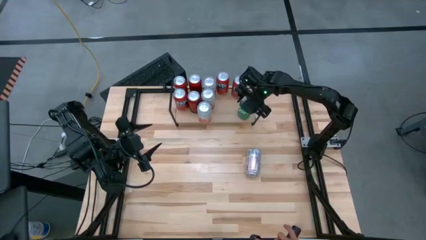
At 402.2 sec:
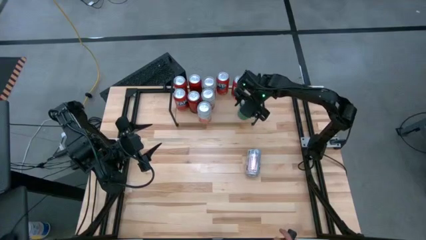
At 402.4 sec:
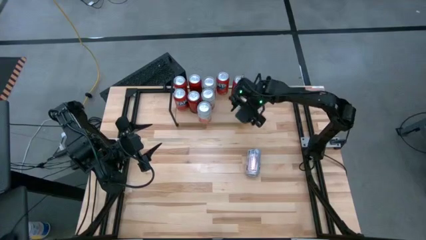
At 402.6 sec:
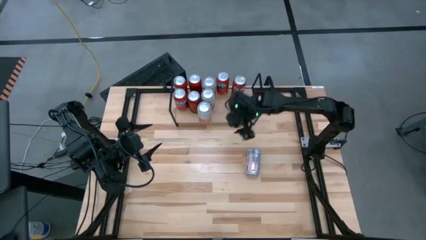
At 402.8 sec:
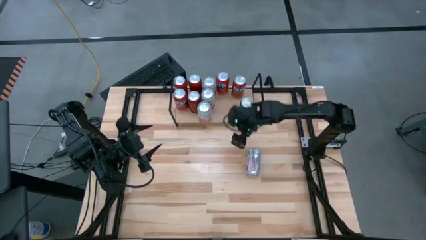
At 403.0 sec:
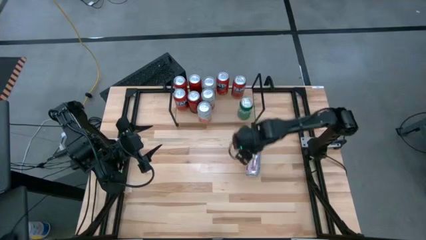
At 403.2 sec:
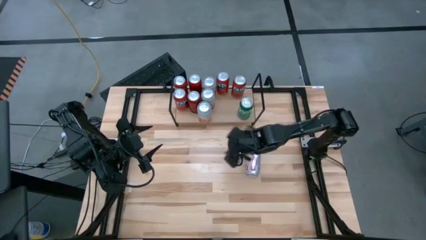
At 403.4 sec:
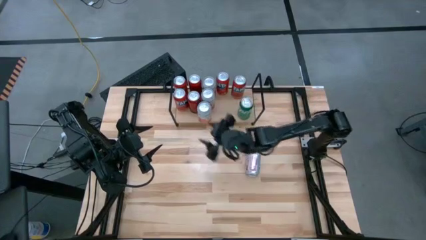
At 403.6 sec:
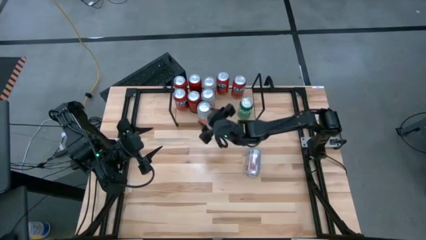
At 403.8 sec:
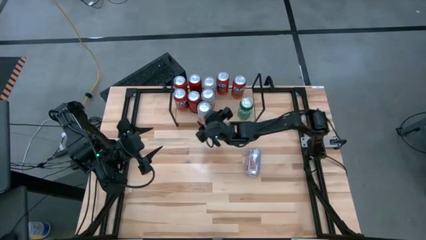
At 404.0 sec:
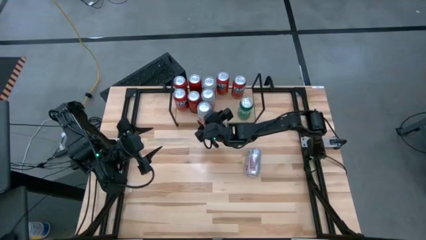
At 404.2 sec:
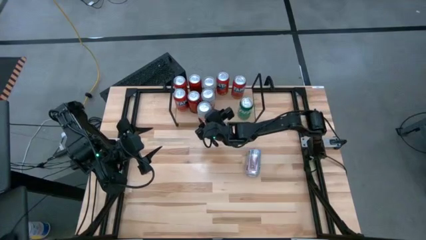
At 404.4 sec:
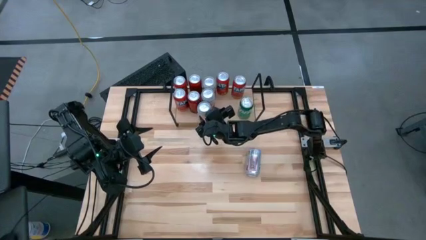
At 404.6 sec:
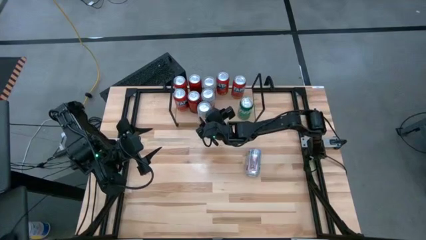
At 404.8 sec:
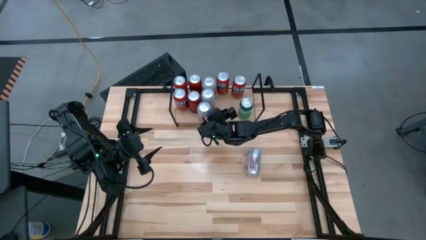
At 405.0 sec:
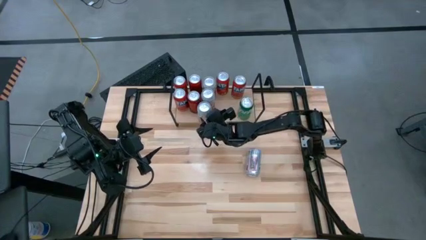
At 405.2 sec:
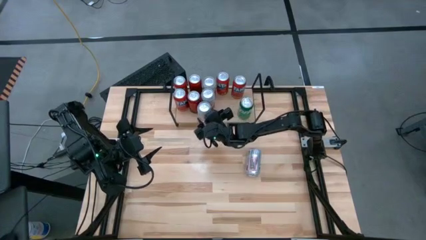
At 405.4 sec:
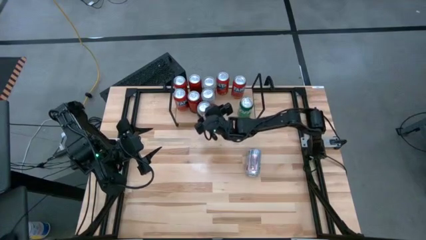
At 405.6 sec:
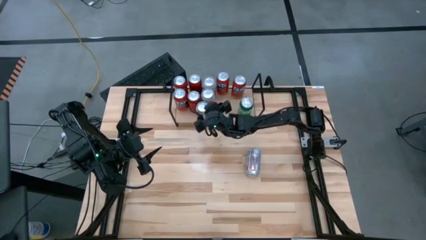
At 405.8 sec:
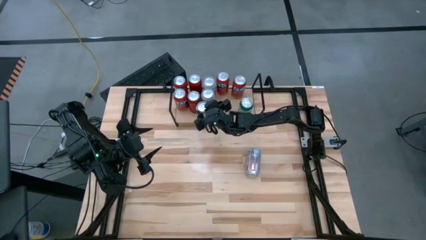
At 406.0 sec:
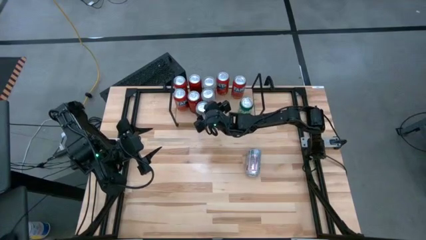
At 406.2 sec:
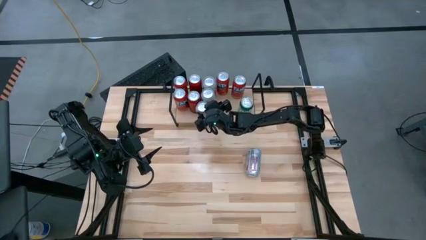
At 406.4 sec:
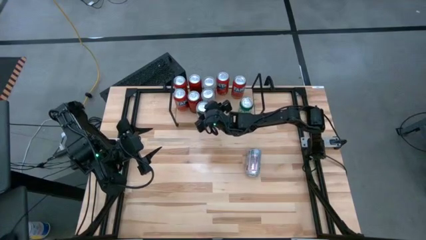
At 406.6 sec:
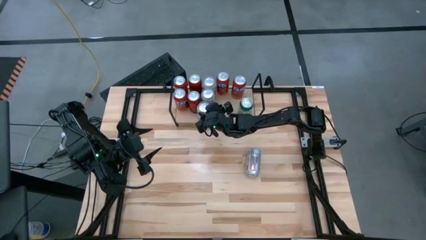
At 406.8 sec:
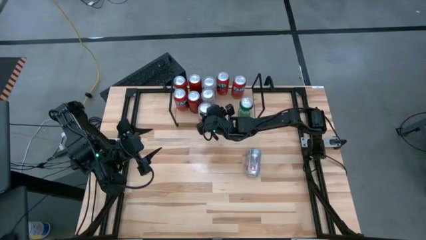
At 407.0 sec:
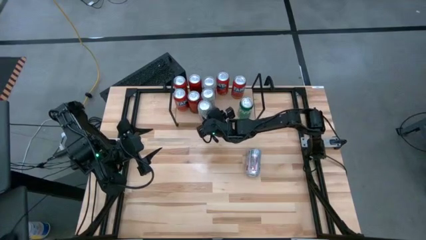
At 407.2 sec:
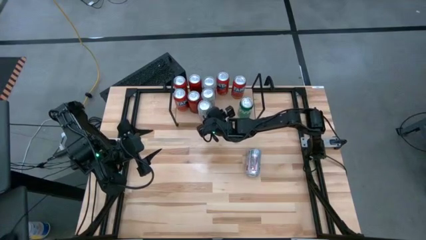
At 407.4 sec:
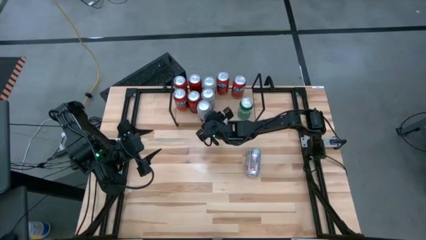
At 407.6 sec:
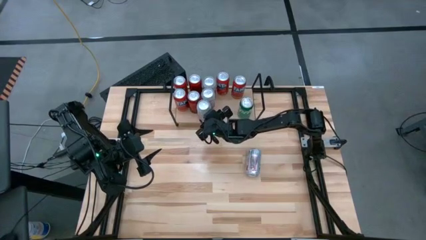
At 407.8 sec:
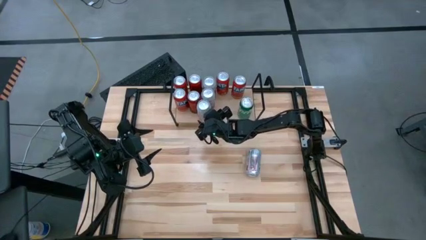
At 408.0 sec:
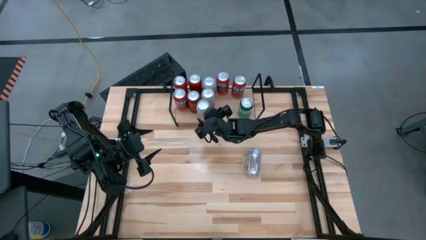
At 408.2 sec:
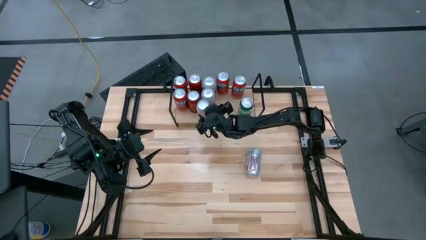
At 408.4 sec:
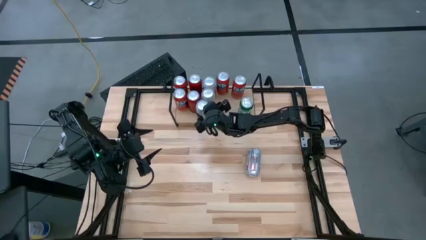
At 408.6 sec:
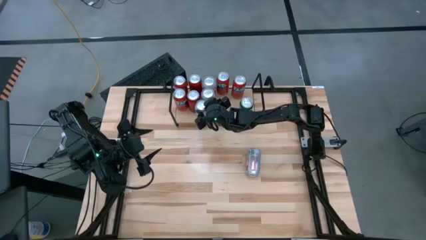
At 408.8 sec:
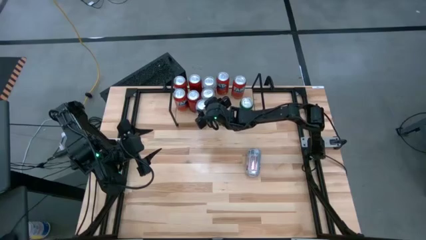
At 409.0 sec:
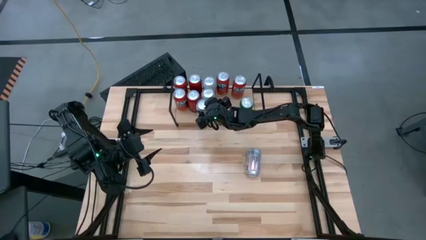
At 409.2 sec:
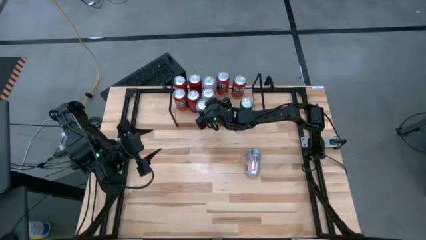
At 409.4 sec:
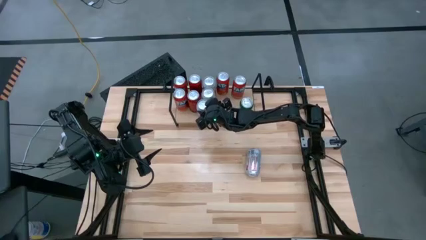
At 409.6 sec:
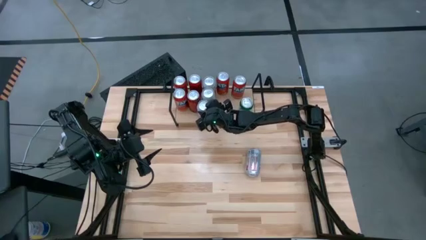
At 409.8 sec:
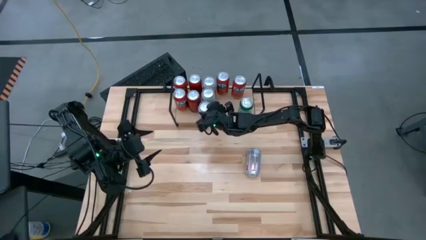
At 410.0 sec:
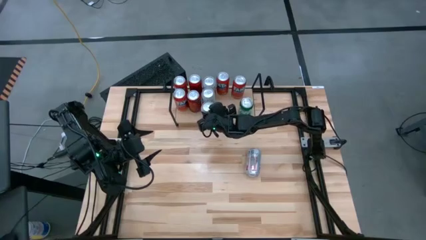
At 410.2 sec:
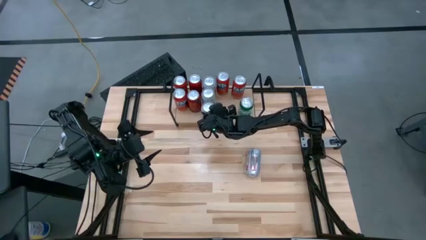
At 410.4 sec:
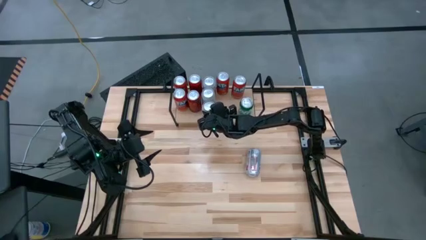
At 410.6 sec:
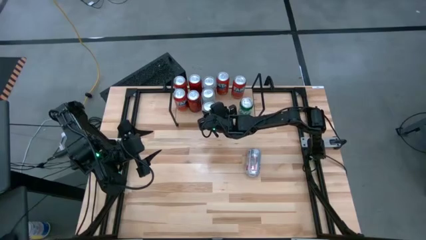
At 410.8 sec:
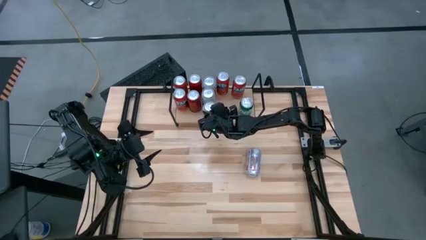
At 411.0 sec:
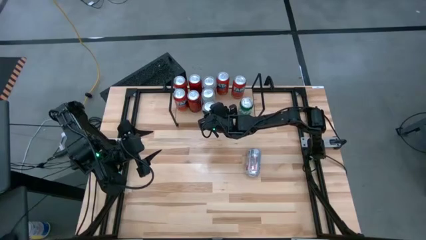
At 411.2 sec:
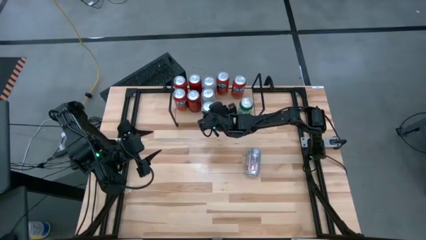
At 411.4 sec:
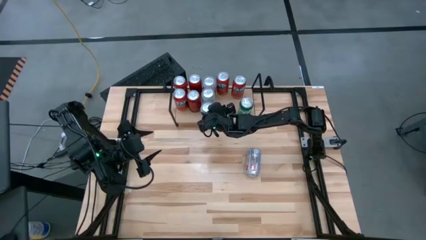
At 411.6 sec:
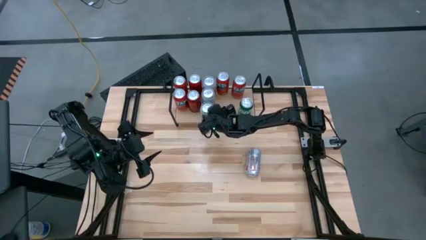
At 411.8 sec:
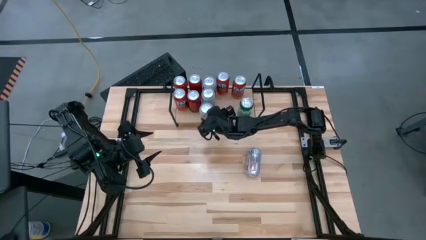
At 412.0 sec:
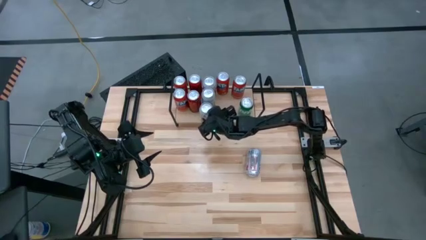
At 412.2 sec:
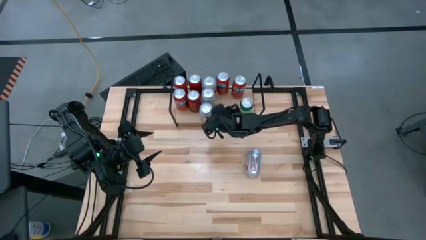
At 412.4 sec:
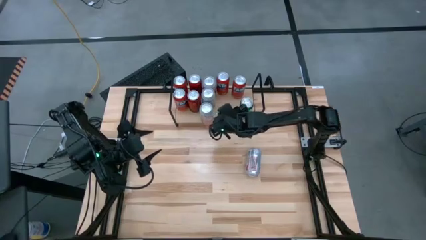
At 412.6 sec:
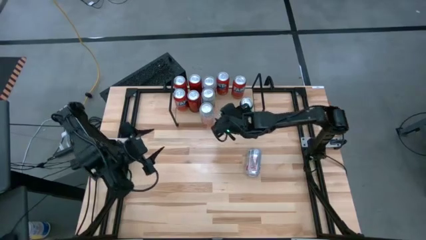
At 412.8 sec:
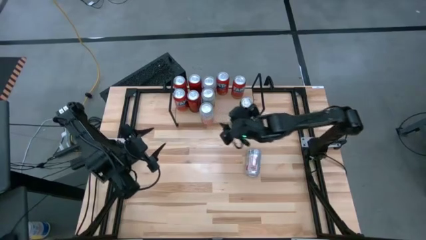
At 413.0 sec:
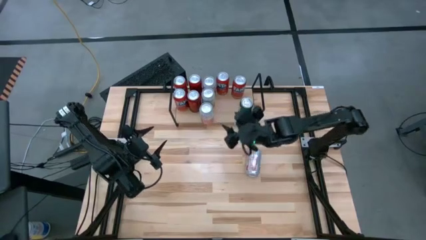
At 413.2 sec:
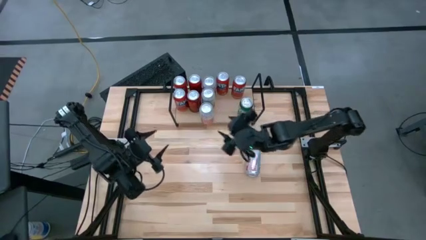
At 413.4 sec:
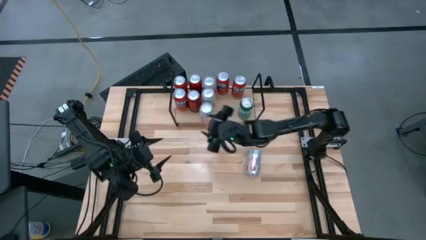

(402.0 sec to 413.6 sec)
Task: Place canned beverage on shelf
Adjust the orange white soda can on the shelf

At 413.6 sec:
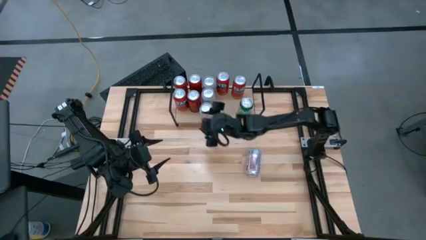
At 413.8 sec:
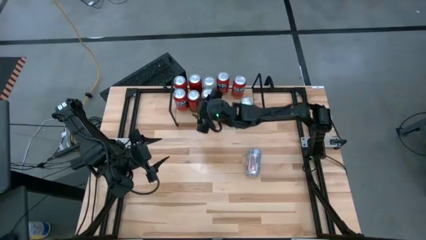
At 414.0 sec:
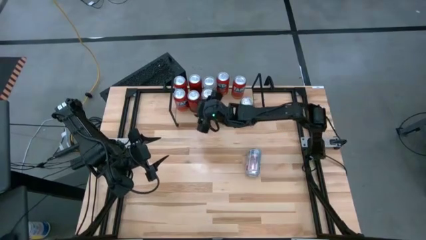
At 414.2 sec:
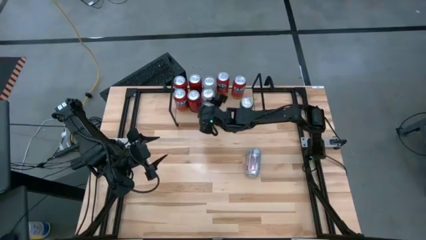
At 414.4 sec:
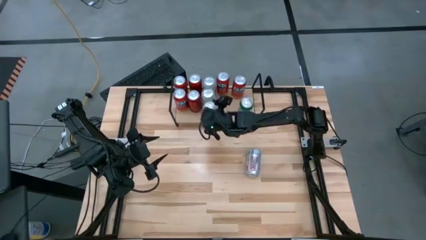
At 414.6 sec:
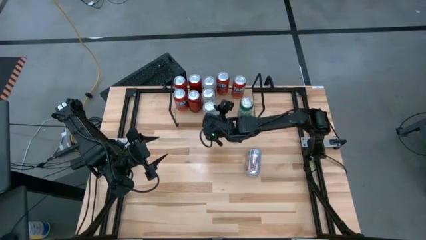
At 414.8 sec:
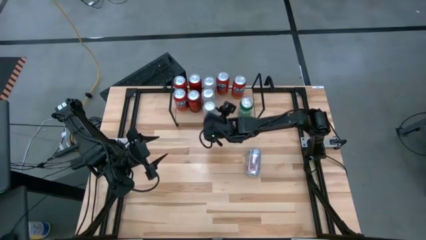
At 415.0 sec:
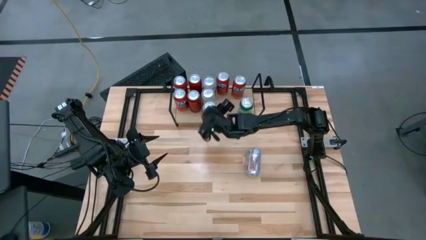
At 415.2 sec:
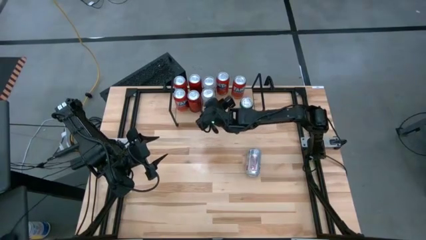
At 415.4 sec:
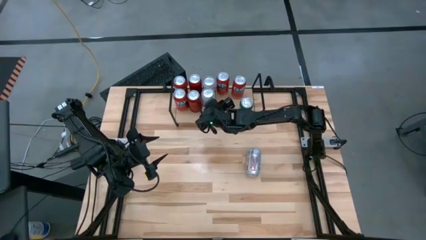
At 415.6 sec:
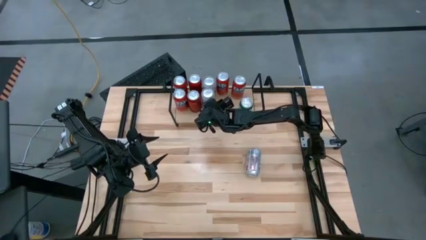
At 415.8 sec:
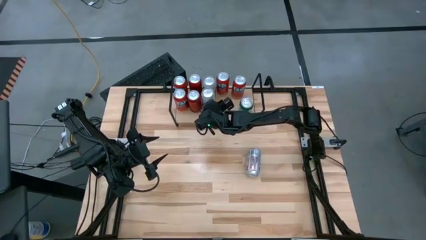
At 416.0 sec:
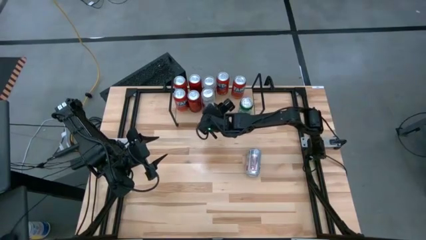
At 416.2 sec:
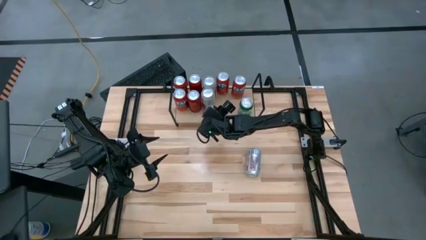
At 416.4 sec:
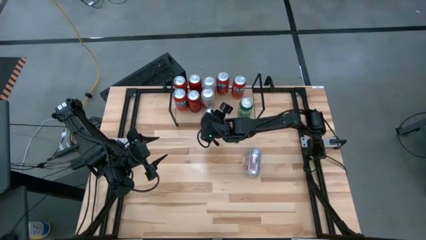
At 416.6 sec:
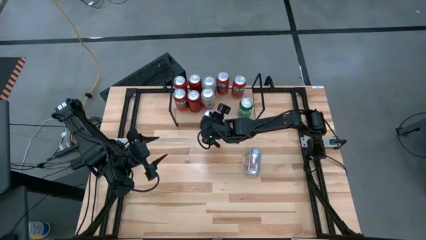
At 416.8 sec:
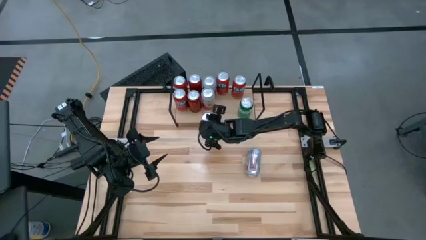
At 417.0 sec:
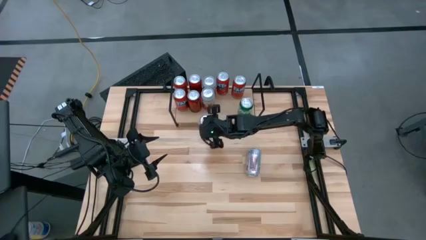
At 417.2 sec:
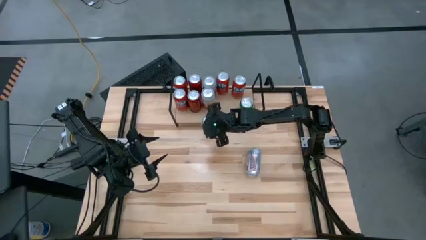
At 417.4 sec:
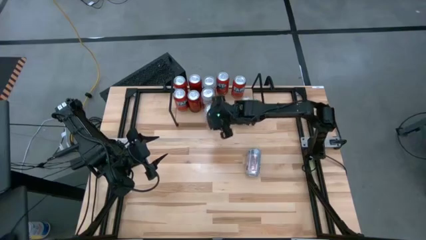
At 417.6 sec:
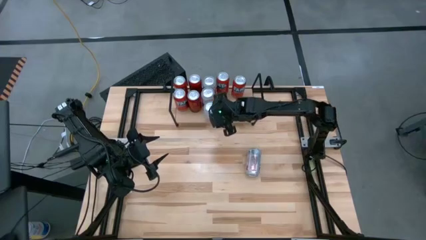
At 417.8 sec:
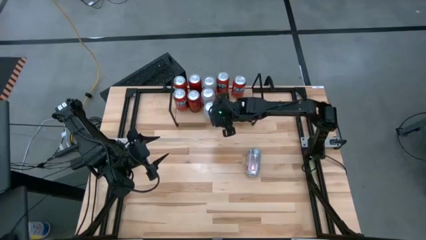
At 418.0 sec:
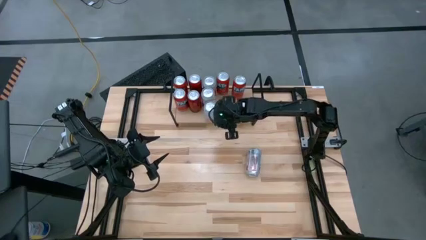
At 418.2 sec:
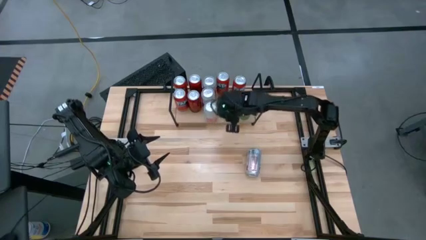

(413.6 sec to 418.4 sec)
Adjust the orange white soda can on the shelf
